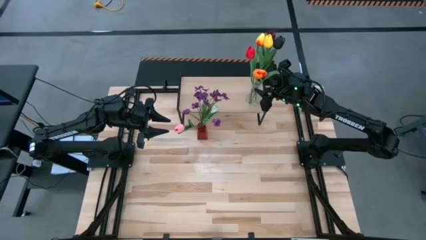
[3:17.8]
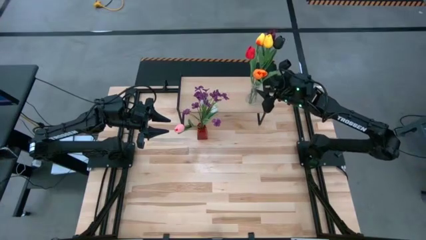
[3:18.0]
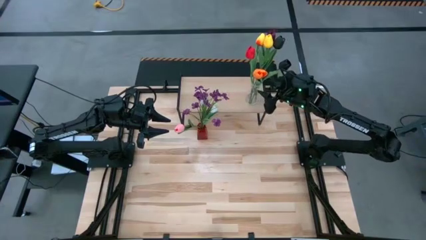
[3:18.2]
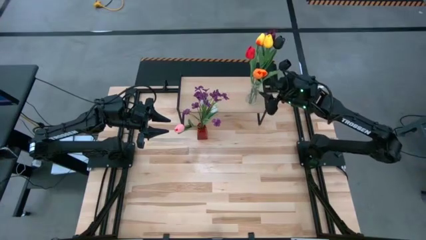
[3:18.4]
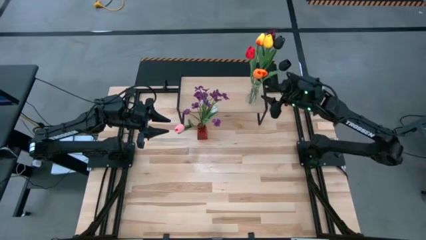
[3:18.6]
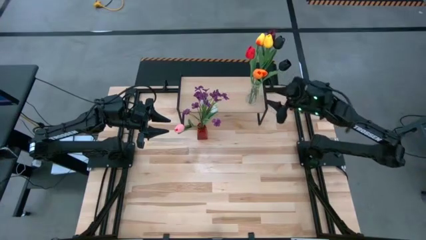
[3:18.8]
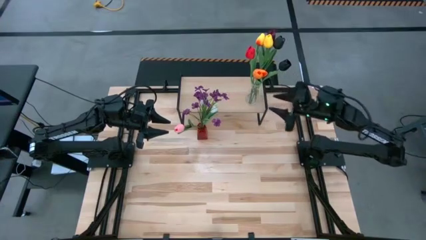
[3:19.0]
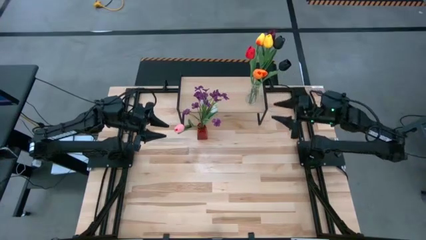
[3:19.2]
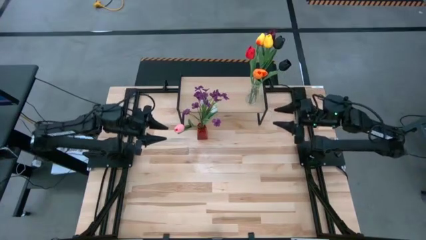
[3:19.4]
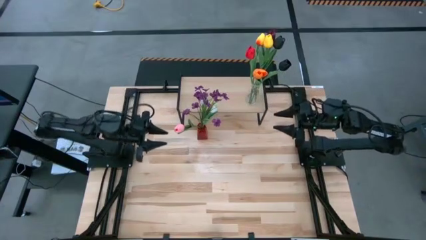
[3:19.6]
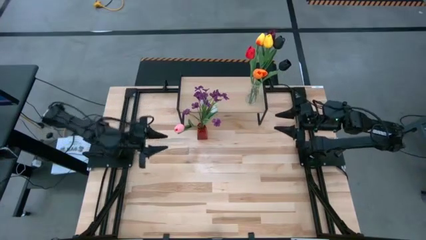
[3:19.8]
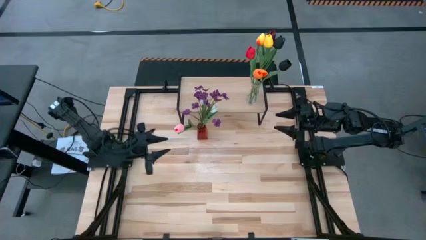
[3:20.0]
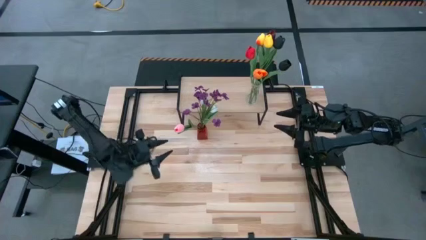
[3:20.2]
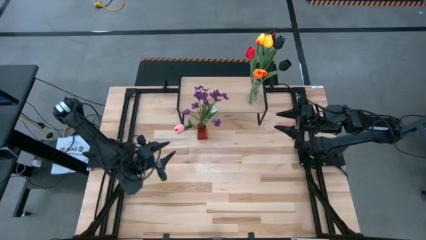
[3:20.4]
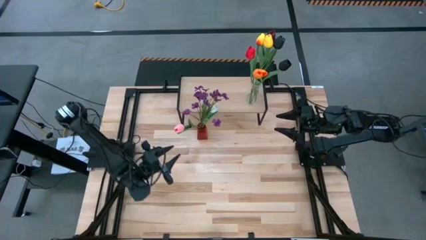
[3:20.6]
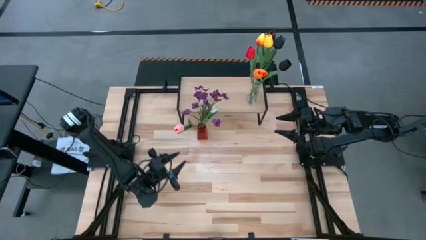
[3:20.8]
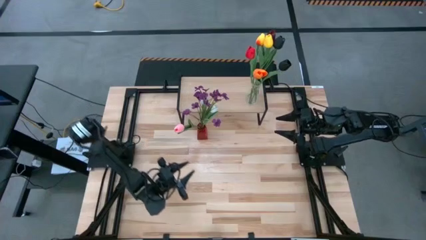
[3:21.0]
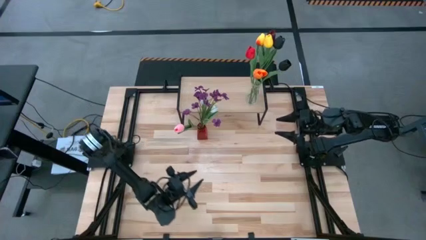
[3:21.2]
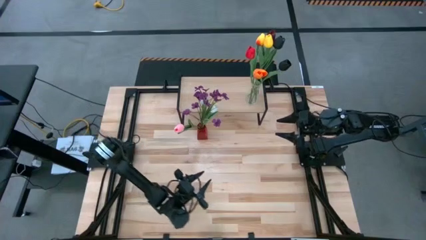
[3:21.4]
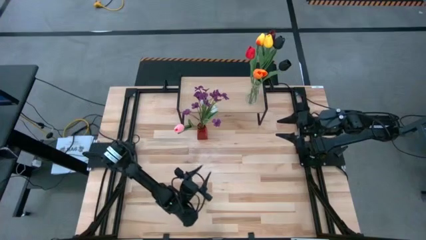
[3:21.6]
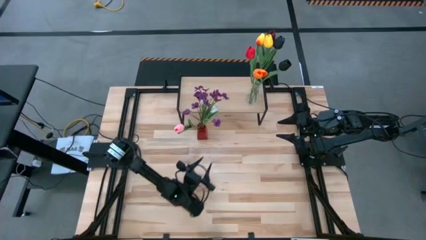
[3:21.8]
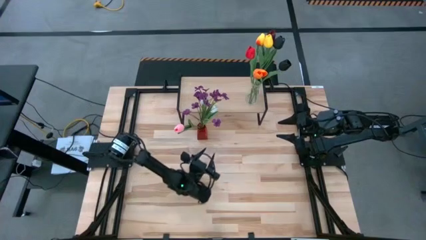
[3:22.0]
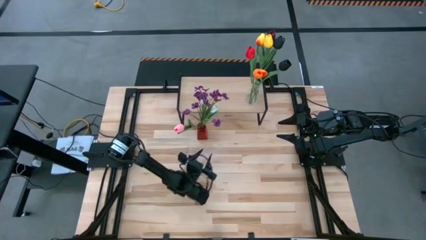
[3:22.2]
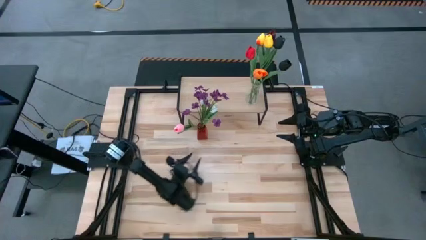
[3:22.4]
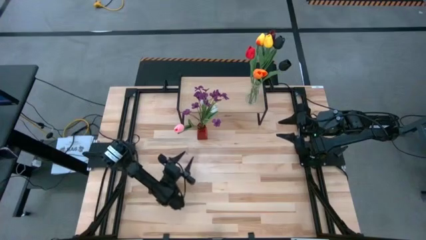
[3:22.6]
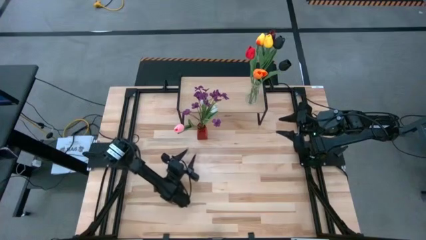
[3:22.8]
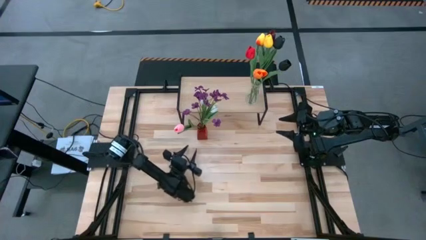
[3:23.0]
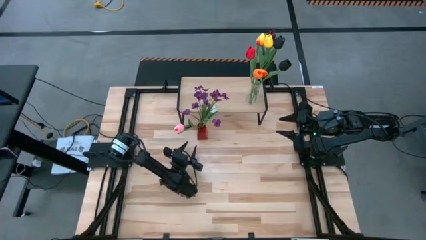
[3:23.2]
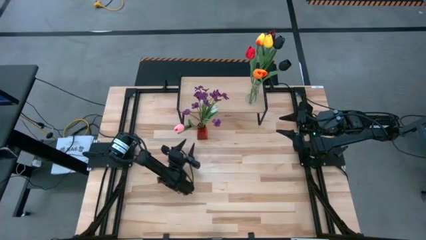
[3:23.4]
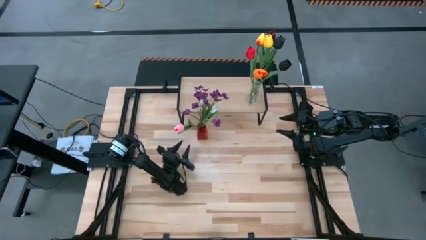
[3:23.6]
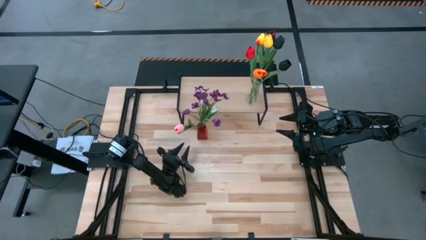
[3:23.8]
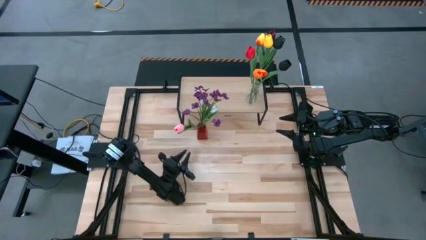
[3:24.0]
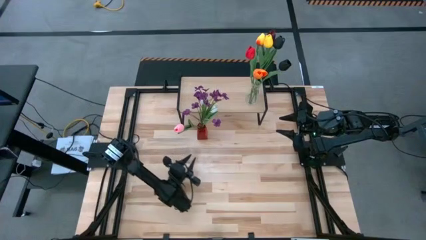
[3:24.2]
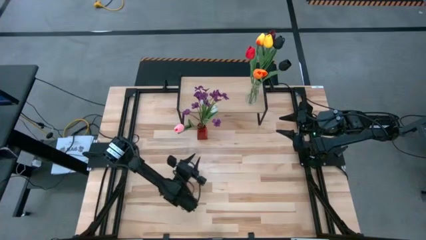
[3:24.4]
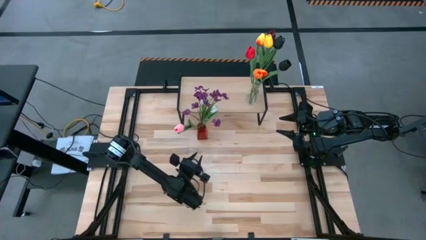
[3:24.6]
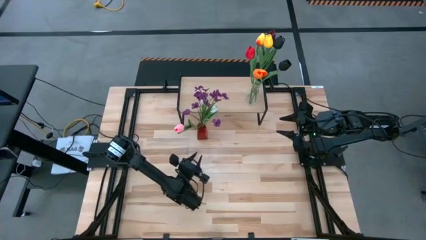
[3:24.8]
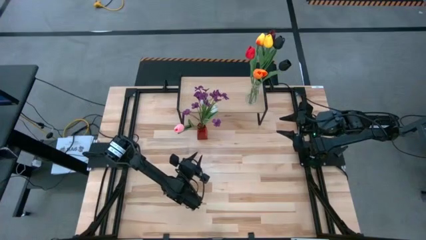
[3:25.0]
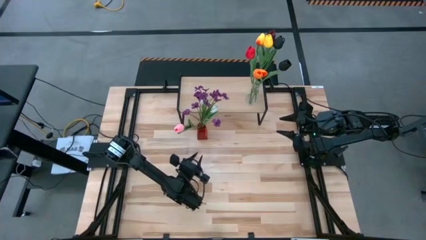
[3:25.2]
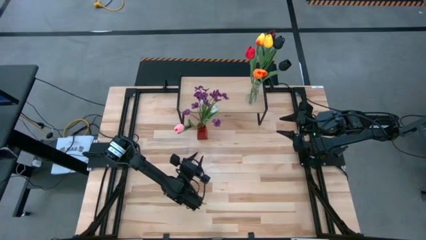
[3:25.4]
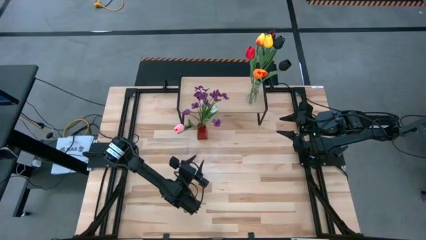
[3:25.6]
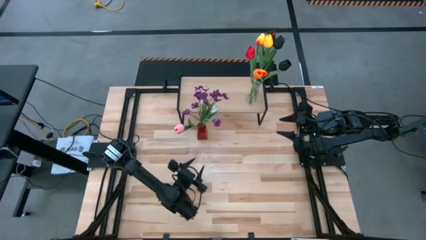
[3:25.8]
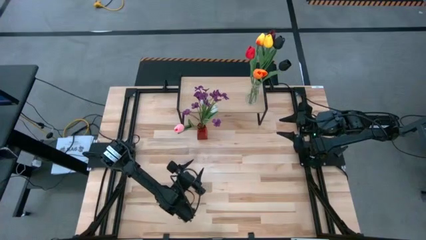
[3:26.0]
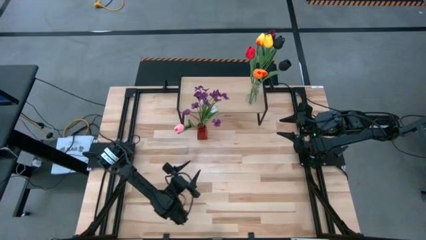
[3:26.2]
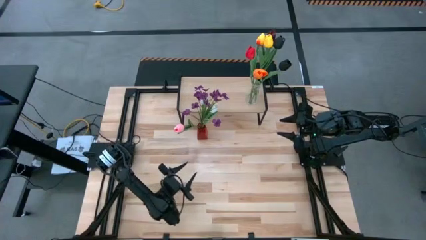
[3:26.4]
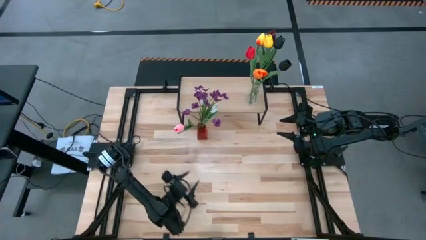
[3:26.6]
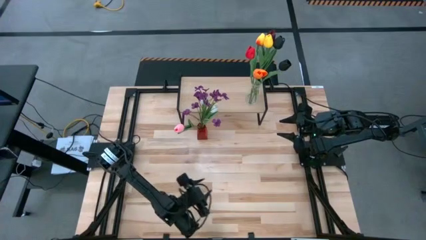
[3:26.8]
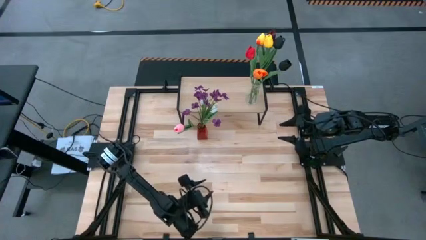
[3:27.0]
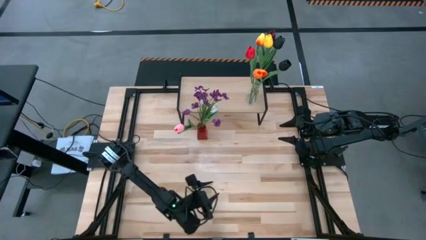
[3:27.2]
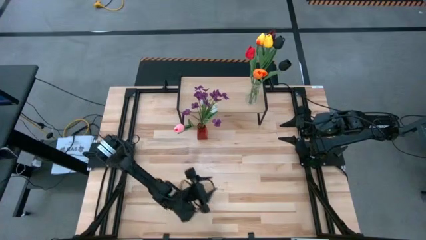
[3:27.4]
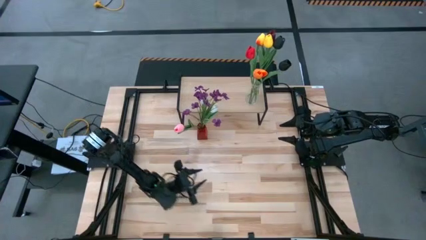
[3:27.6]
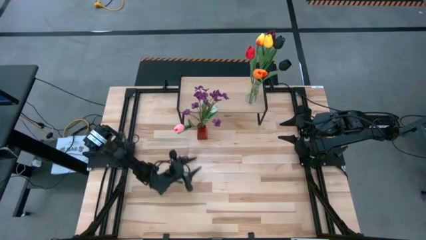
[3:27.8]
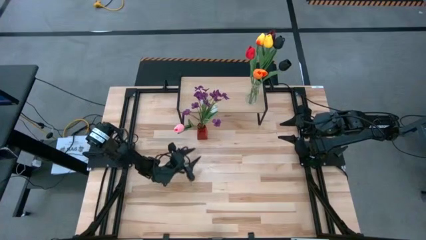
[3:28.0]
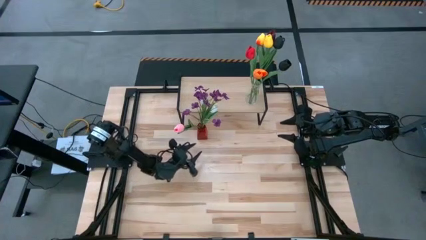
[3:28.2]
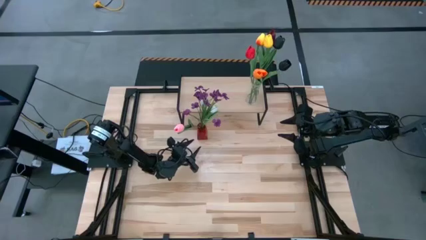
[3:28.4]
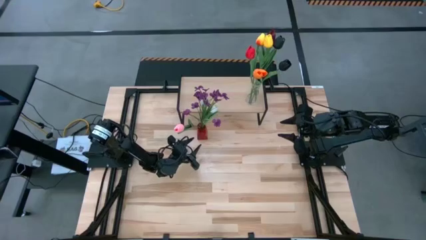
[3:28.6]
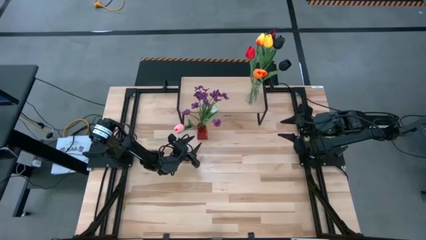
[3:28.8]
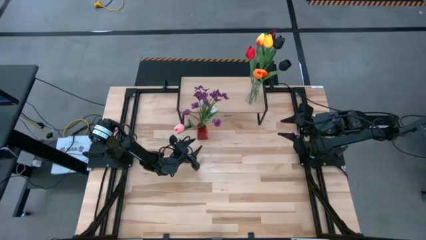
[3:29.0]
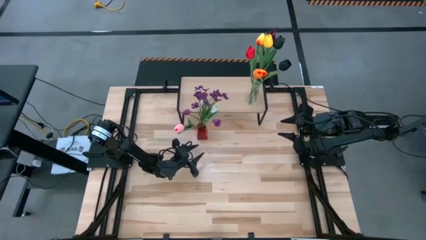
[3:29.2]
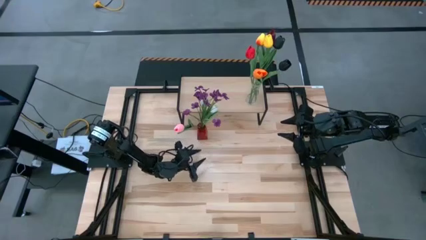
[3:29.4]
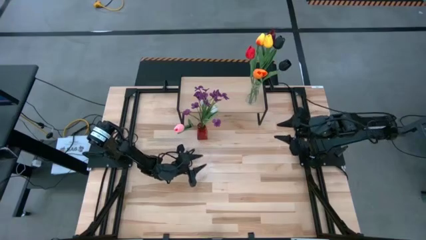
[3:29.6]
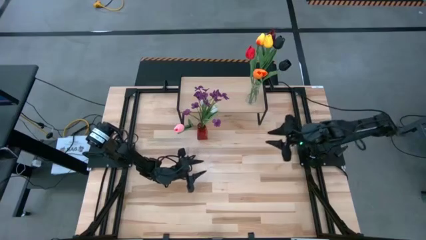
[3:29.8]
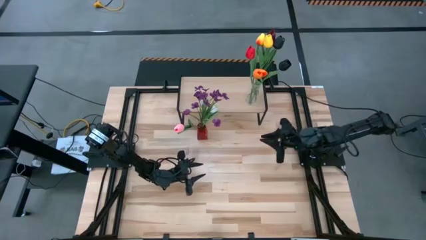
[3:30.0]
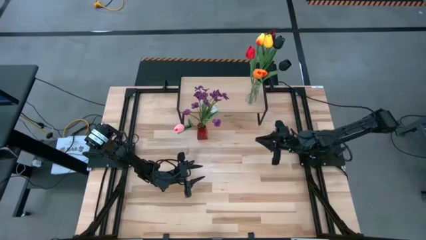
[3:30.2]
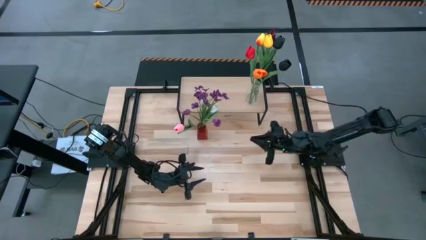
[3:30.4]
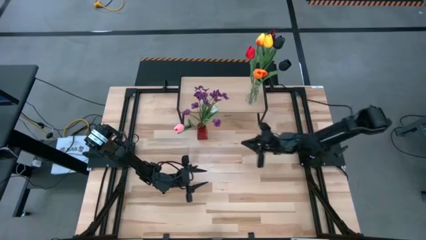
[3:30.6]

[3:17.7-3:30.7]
Task: Pick and place flowers into a vace then onto a shelf
Put the red vase with flowers on the shelf
